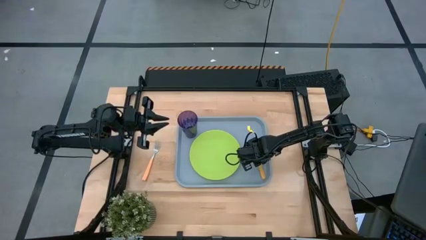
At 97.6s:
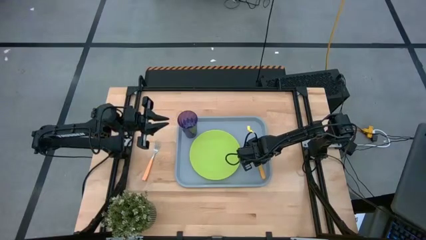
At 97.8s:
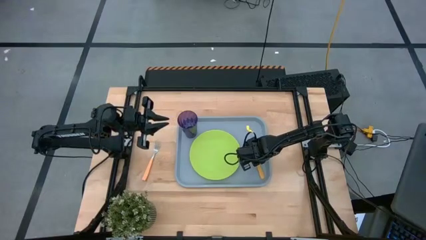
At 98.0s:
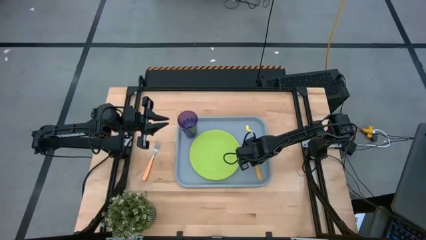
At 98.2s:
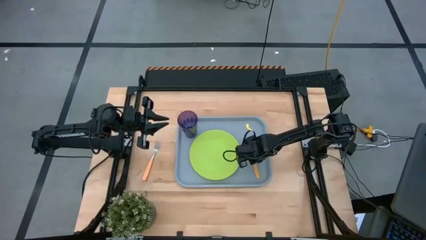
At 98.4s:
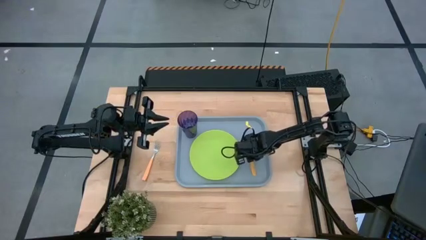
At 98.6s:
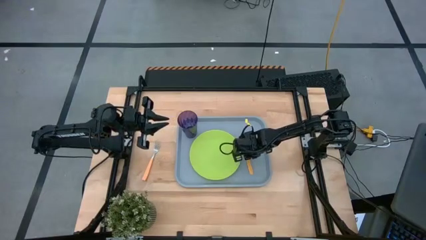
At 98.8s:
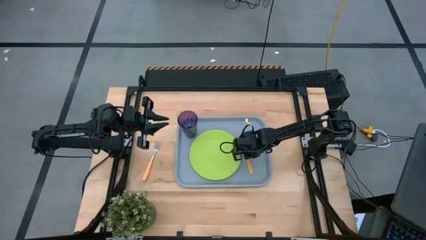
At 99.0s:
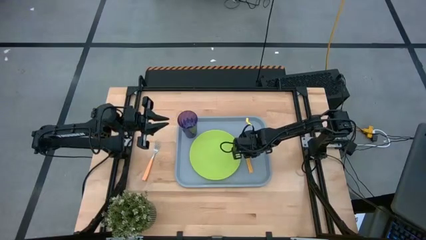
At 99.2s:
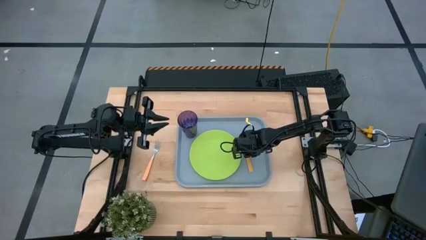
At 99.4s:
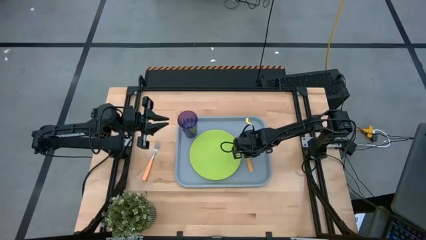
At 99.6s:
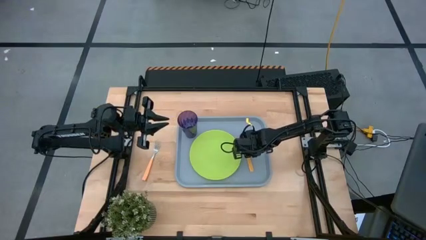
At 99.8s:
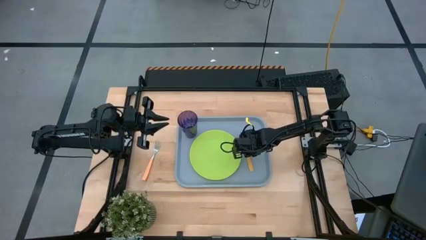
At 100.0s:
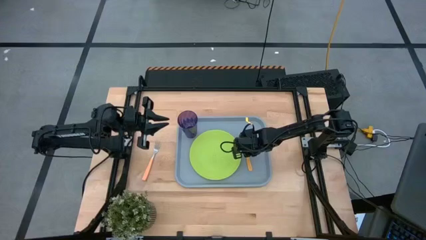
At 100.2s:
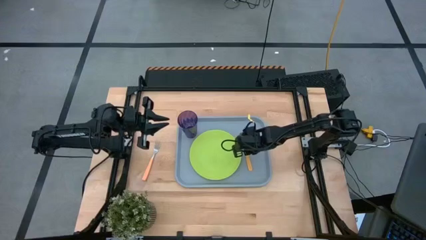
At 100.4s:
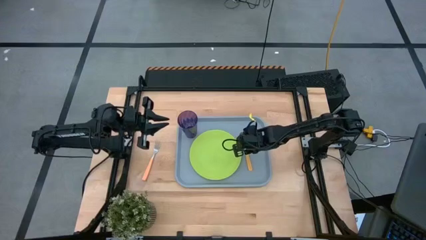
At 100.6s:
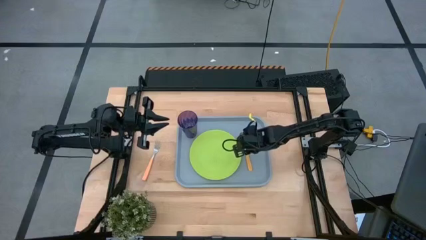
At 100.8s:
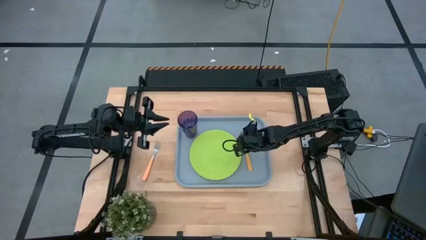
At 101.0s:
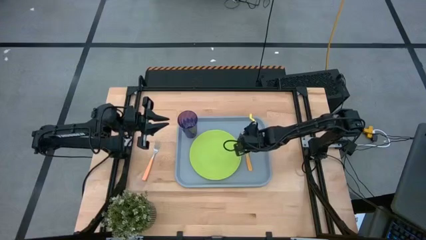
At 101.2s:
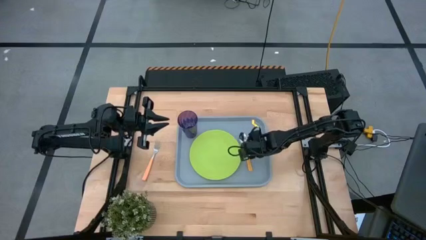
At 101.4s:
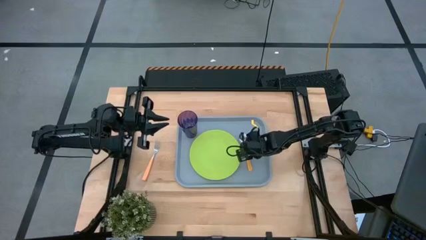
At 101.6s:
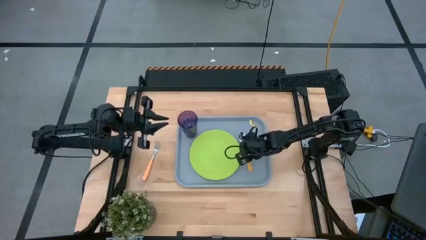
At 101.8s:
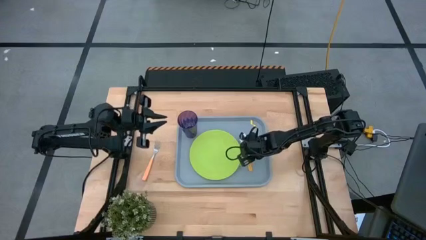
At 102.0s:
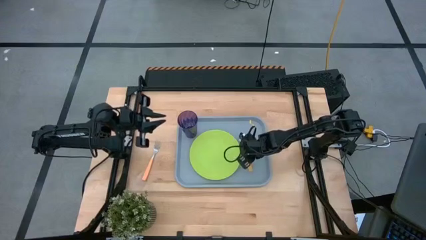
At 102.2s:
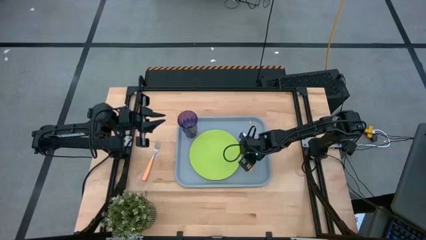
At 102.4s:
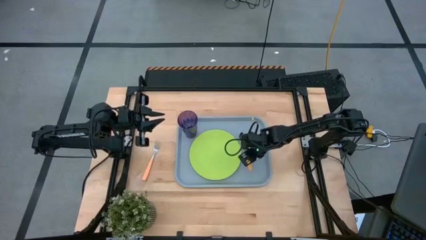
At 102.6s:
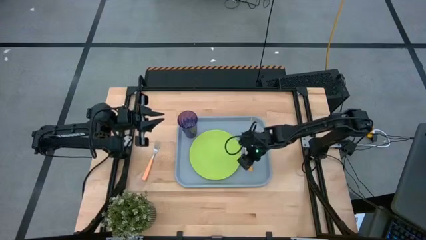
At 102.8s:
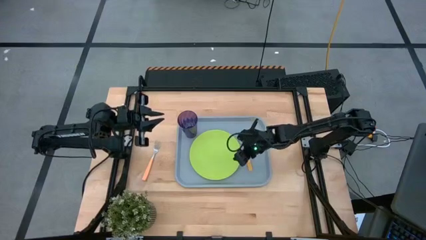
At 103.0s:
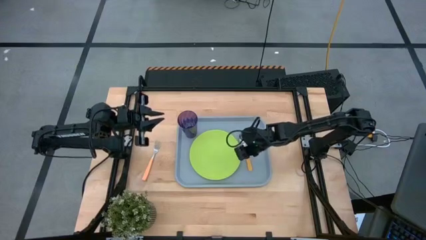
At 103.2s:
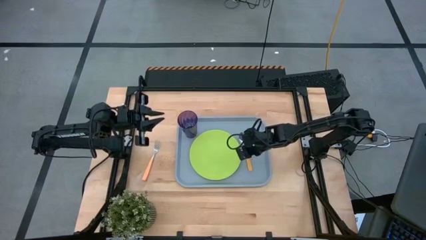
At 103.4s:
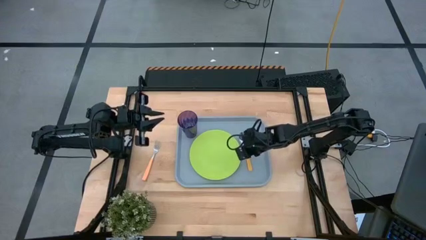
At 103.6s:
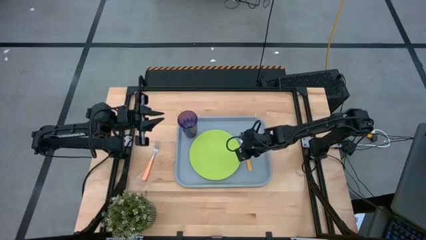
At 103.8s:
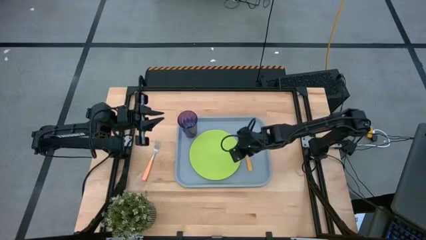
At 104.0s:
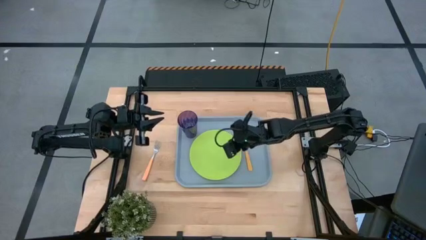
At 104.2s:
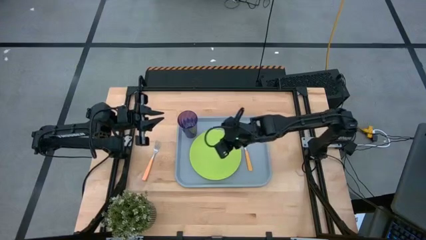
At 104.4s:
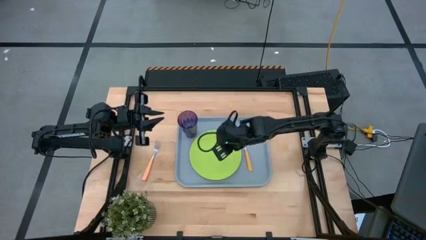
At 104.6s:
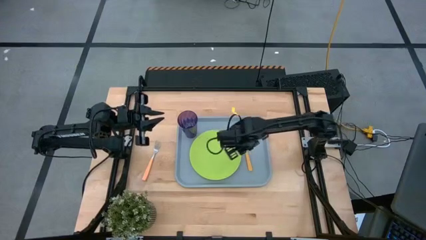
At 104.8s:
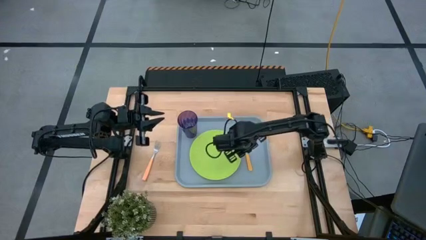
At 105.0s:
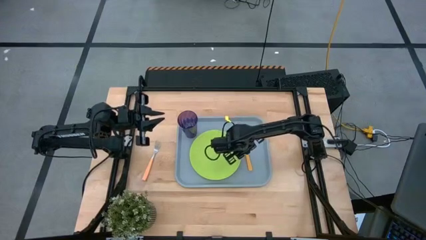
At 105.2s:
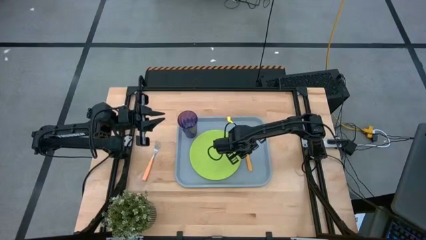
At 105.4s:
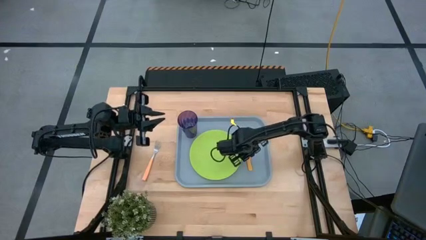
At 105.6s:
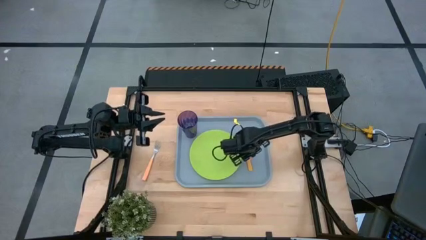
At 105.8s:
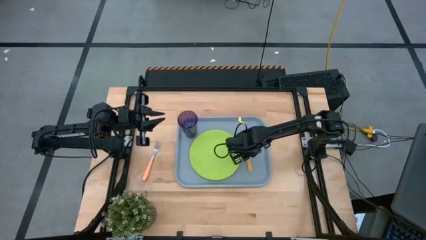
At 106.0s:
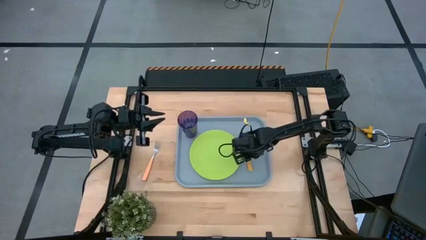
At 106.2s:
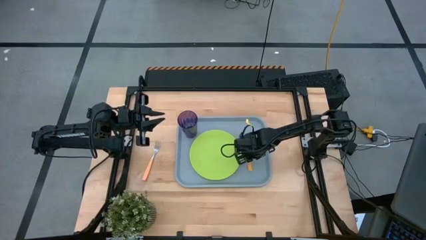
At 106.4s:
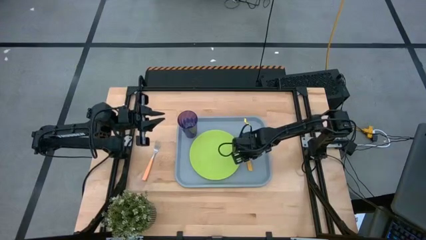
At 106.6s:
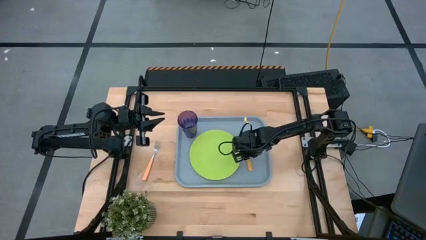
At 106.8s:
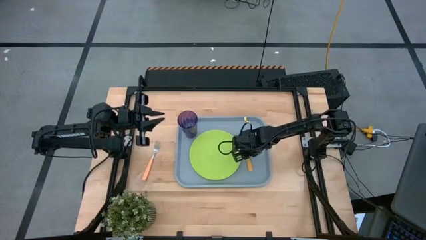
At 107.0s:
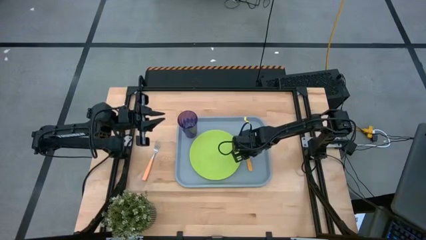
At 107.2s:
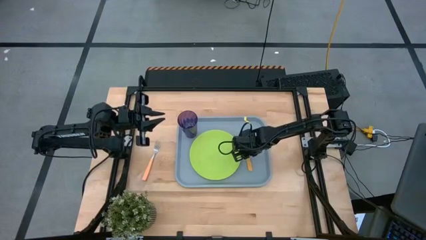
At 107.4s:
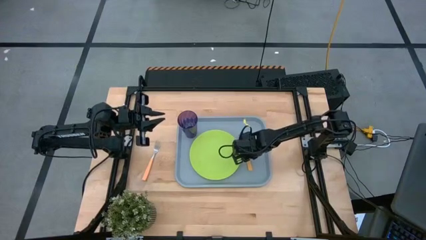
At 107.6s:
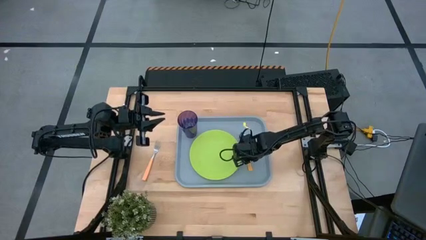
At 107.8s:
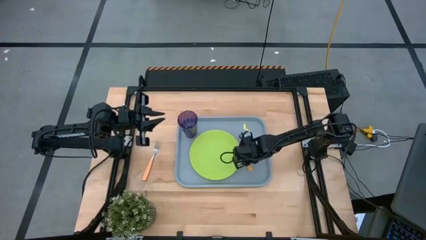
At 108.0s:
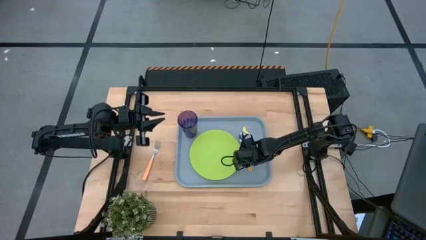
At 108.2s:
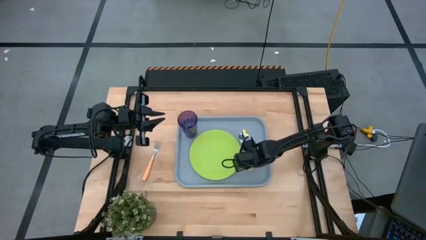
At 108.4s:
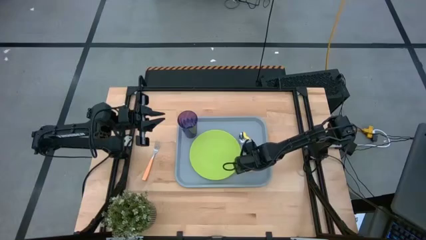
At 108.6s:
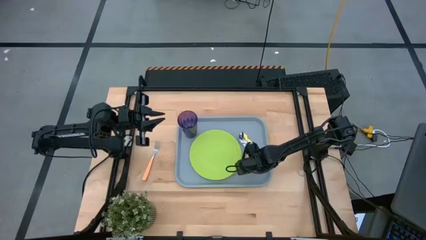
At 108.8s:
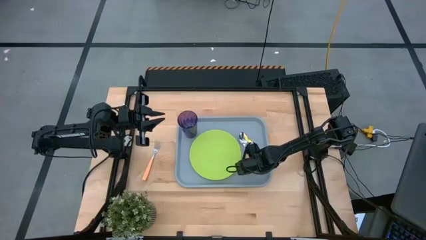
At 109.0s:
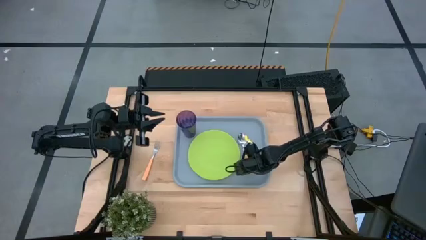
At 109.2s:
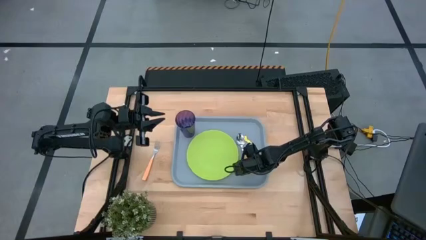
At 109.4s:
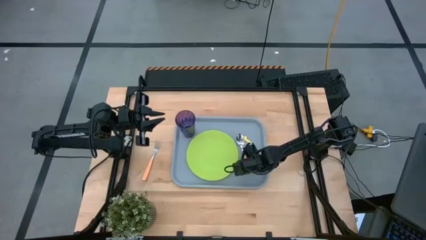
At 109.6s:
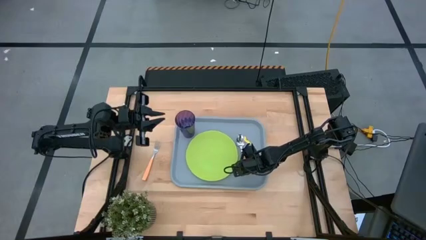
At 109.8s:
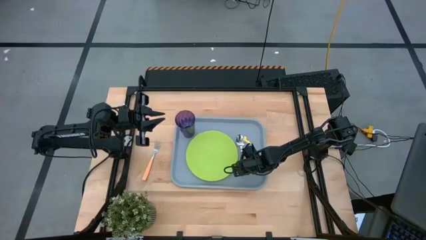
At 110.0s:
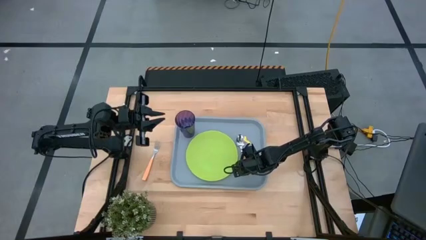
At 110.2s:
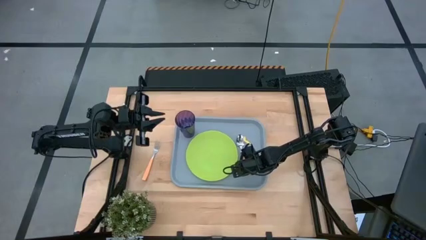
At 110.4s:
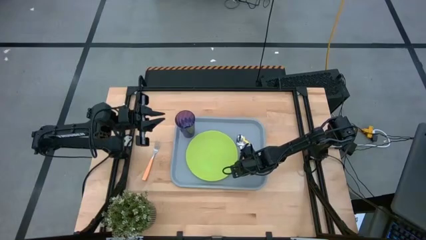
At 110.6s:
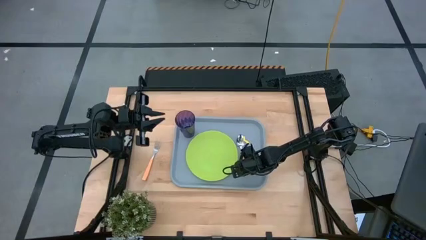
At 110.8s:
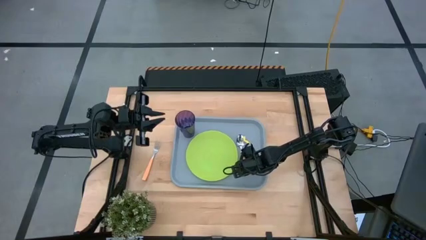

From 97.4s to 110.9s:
Task: Pick and place plate/cup/fork/spoon on tray
Adjust the green plate and the orange spoon on the gray serving tray

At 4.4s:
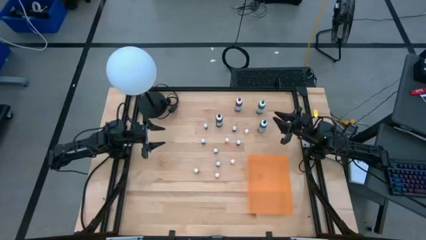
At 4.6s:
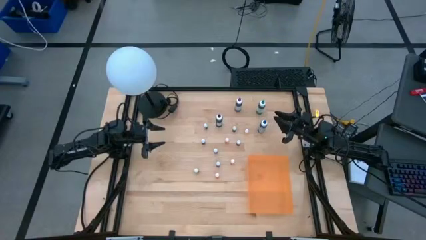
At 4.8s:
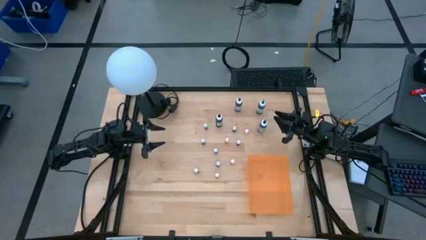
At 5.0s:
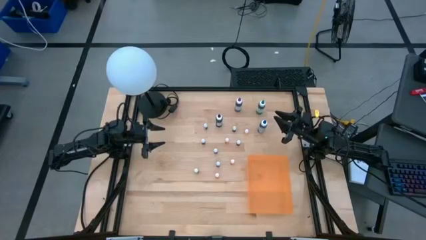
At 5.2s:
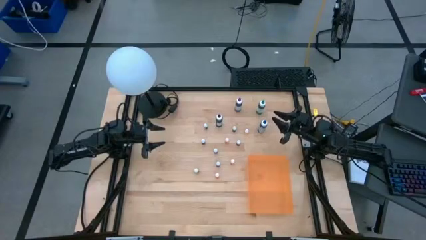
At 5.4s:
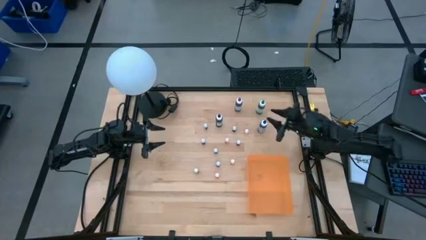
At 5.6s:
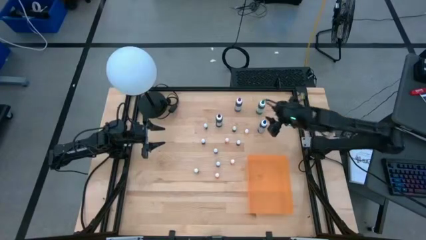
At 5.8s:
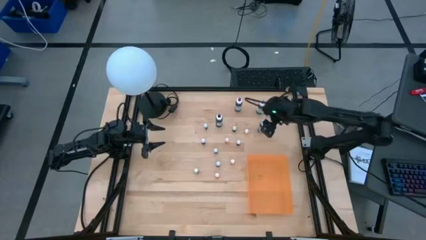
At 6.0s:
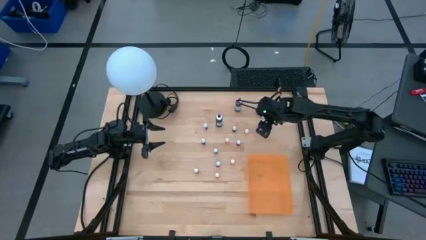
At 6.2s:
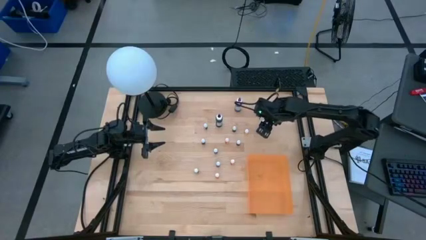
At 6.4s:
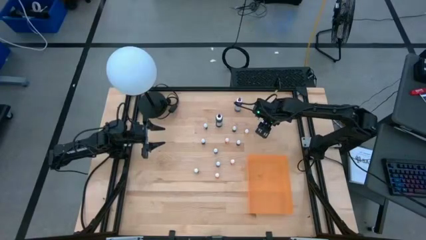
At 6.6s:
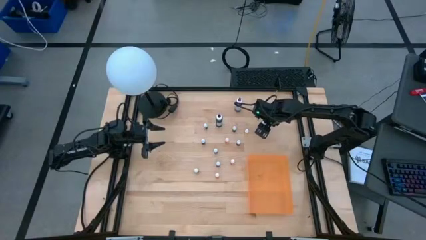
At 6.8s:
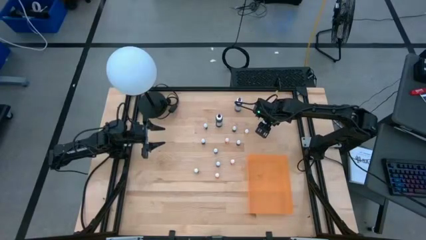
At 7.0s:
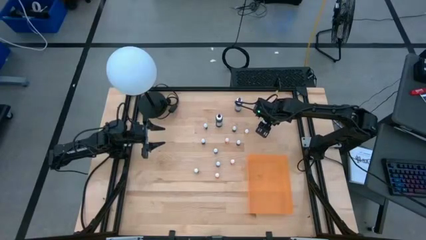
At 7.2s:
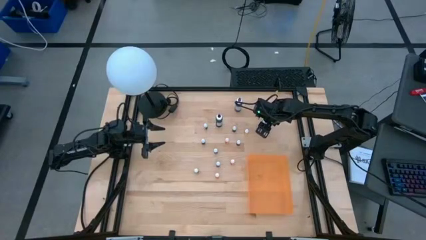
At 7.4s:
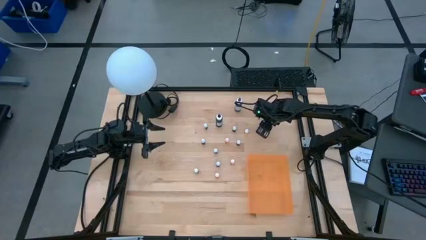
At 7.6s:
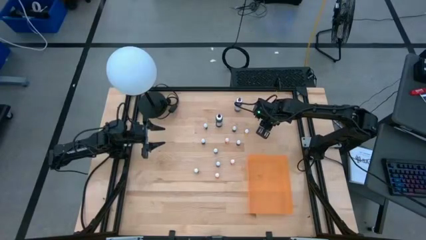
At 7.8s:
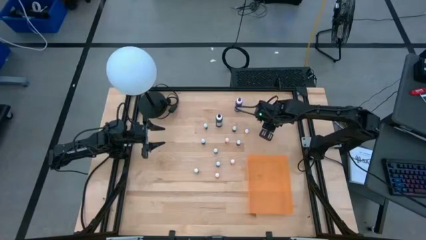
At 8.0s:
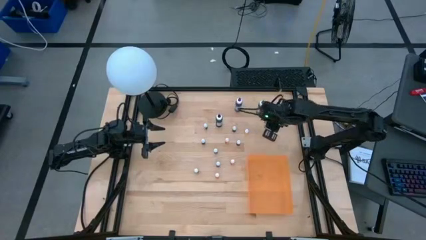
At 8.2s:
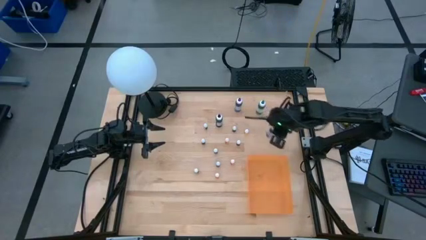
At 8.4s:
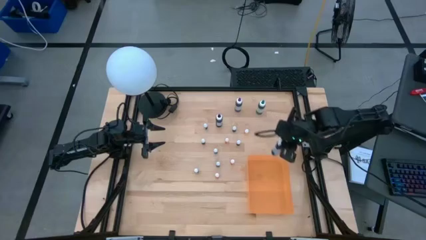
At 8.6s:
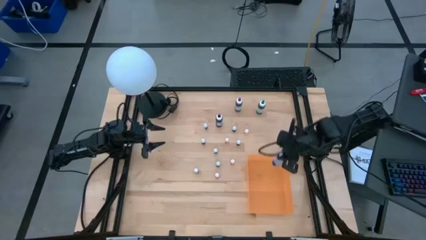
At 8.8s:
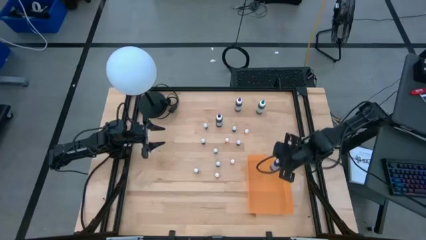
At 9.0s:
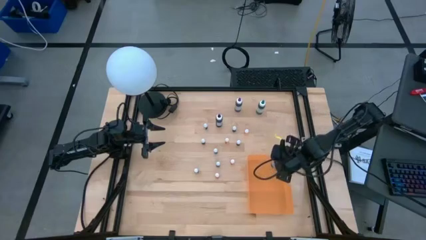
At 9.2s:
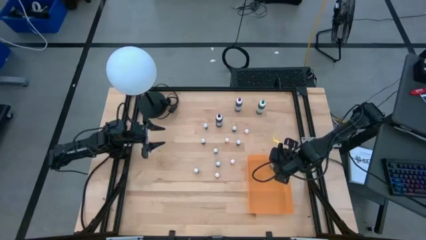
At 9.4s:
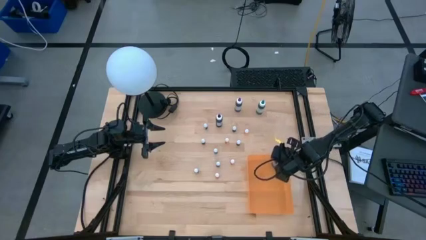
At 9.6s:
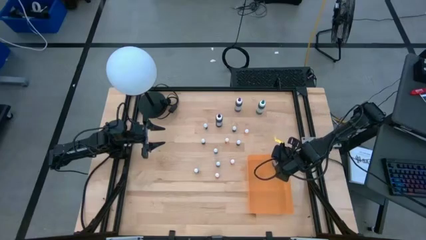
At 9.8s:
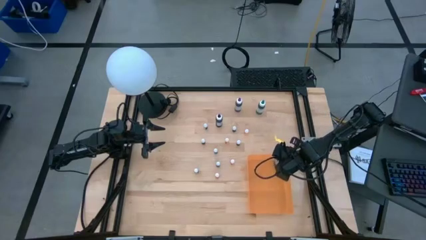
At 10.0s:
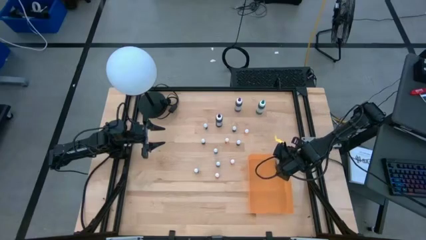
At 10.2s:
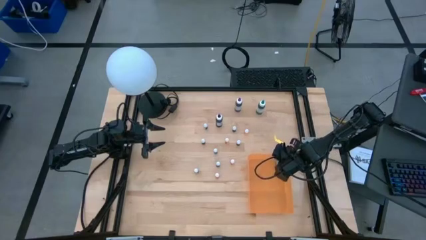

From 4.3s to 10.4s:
Task: Pick & Place food coloring
Put the big blue food coloring bottle into the orange bin
